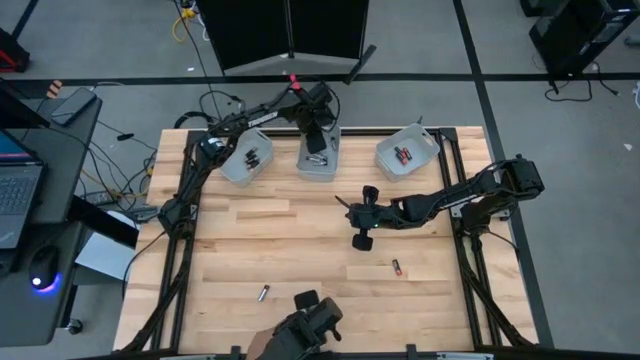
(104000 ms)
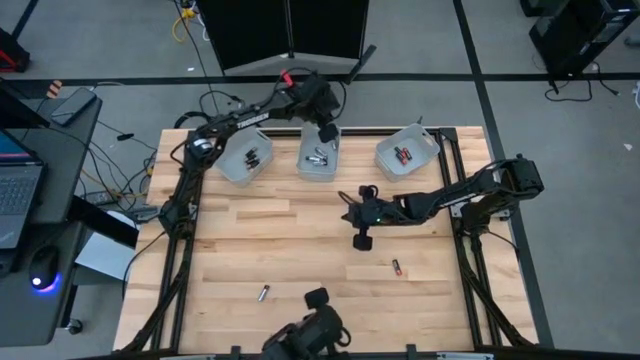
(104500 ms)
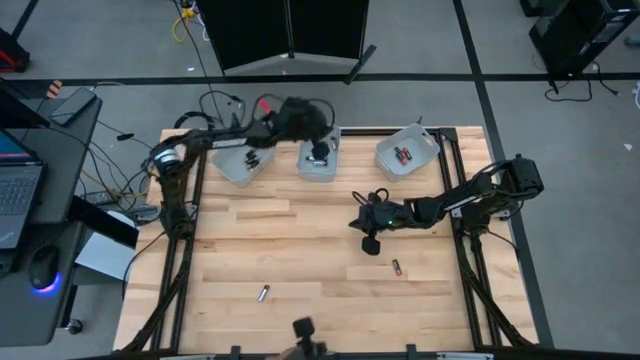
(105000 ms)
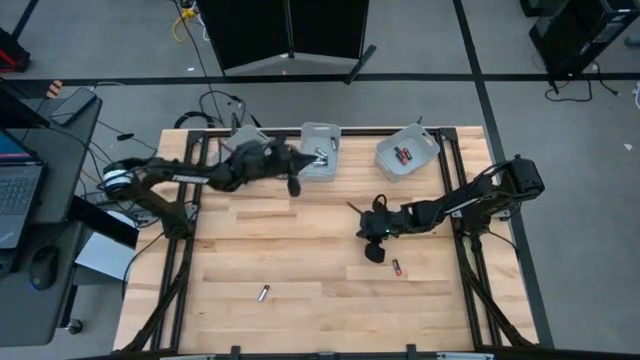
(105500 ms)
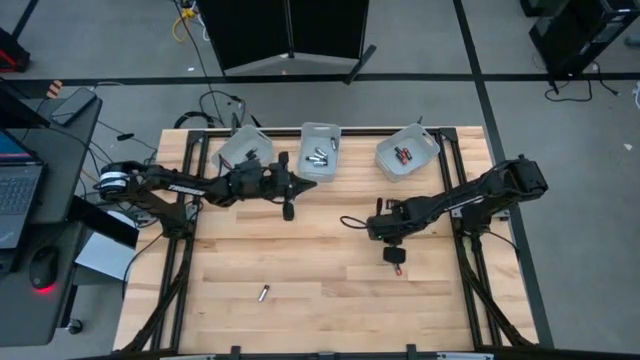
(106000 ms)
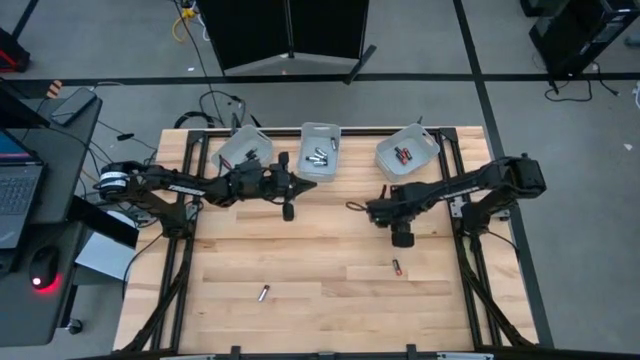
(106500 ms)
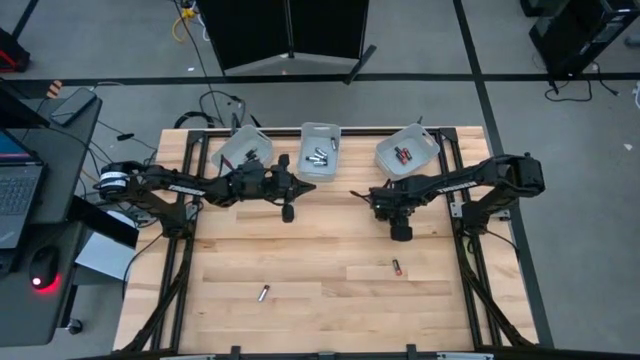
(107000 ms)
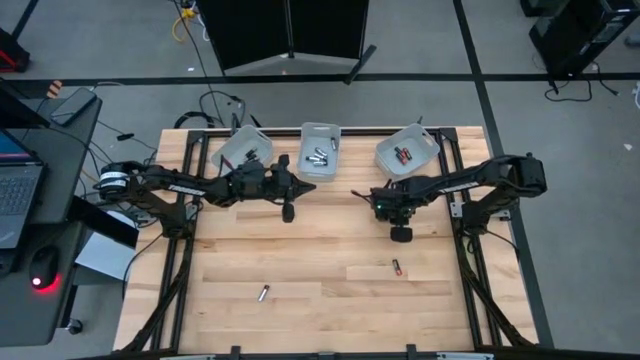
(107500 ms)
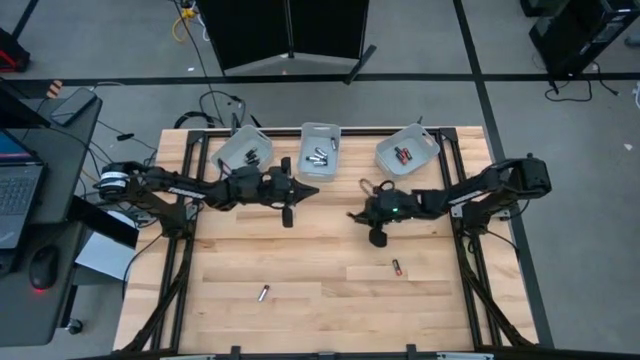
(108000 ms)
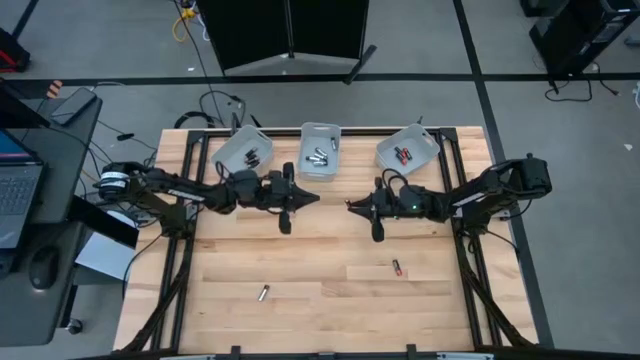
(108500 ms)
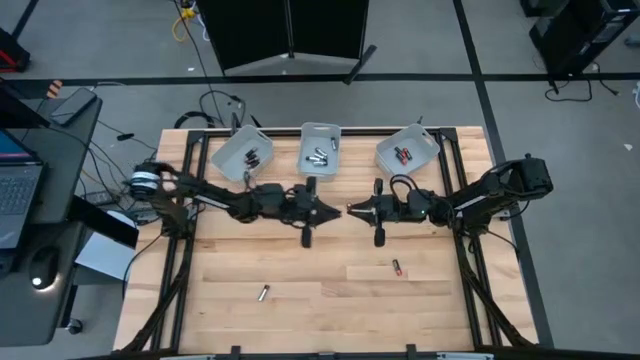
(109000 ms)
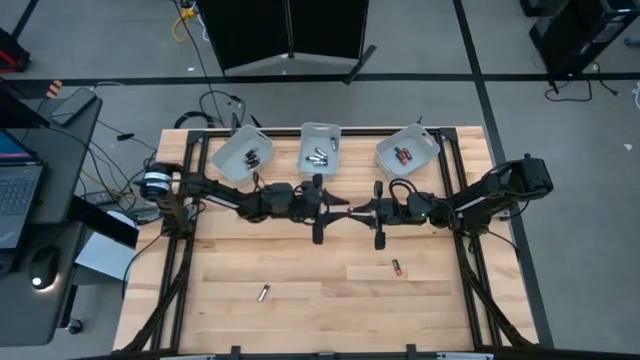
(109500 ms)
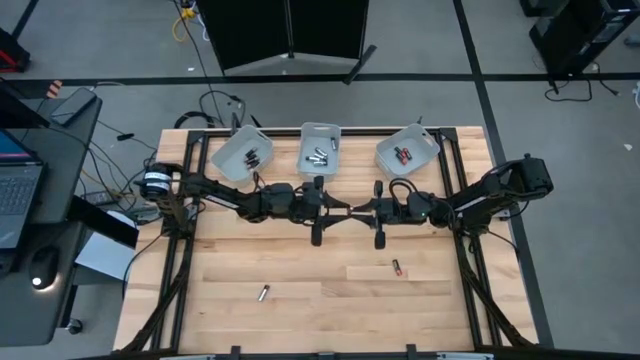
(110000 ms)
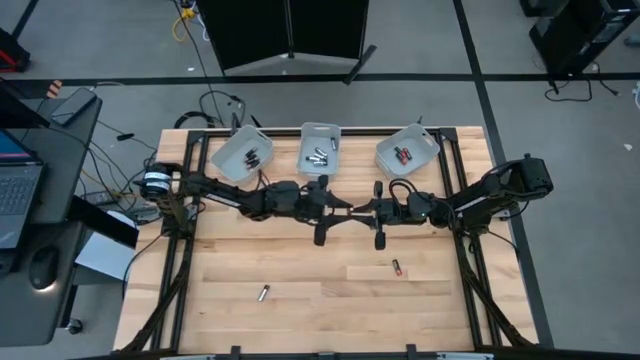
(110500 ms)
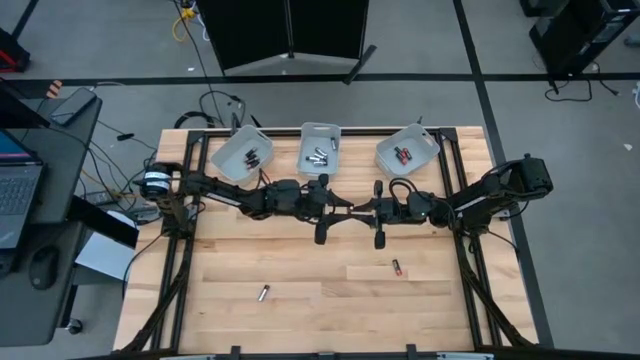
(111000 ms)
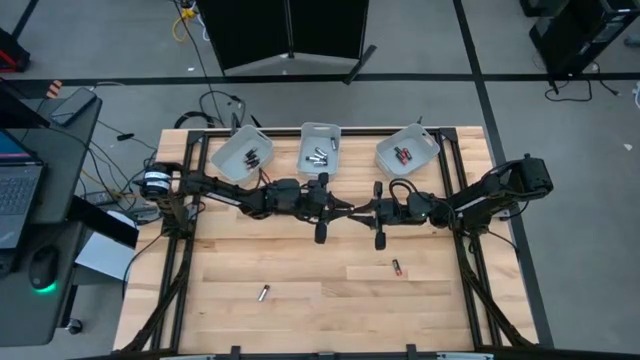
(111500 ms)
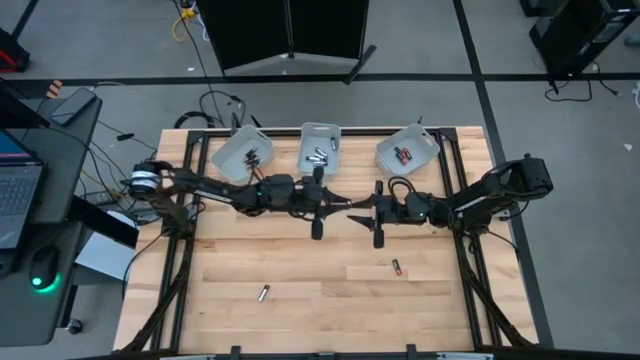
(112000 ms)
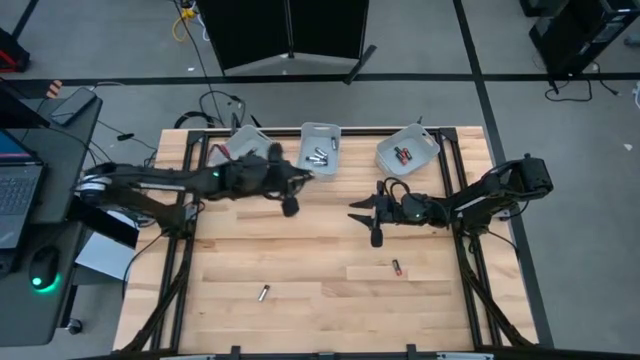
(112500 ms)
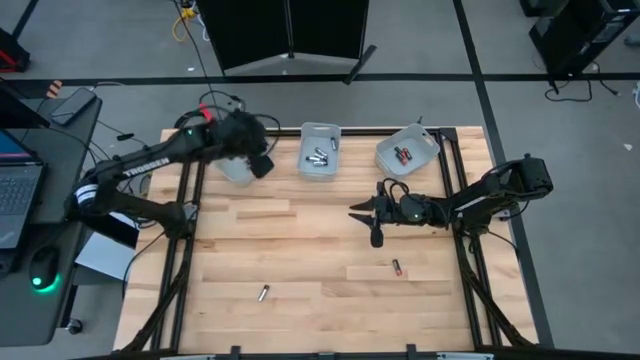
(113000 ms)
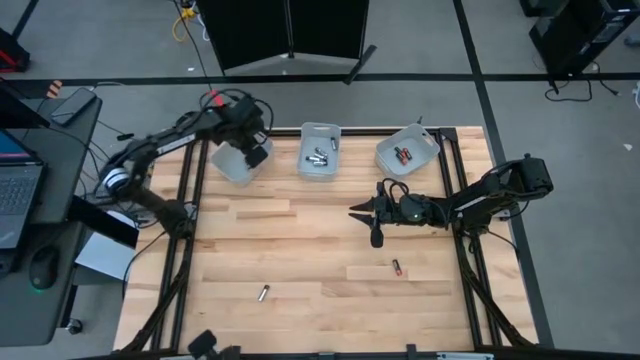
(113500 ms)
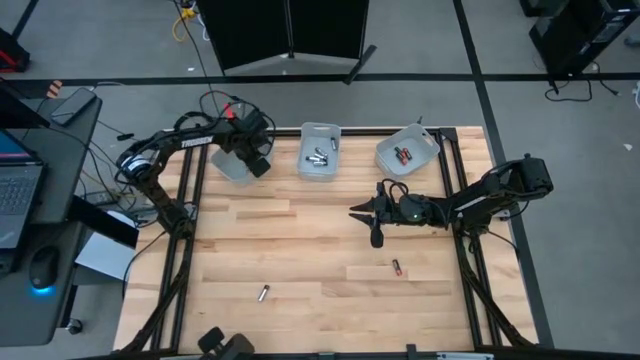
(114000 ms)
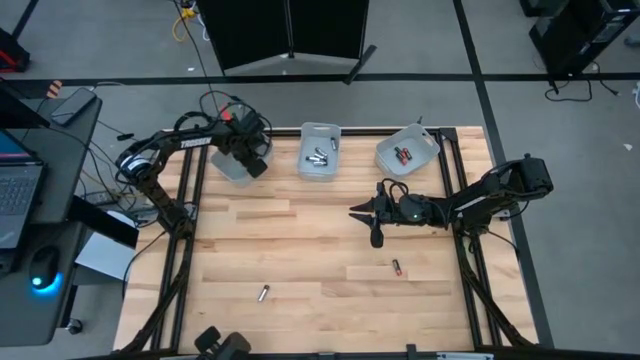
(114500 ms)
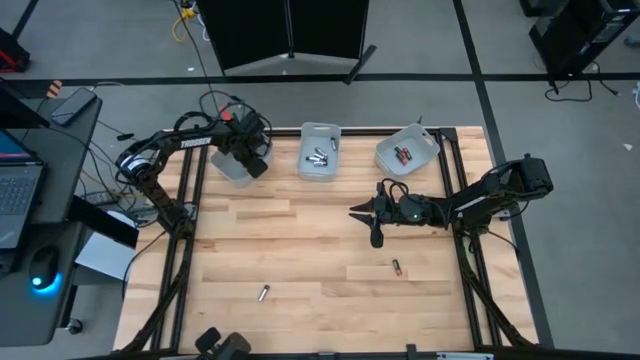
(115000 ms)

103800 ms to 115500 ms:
Task: Sort batteries
Put the gold battery into the left gray bin

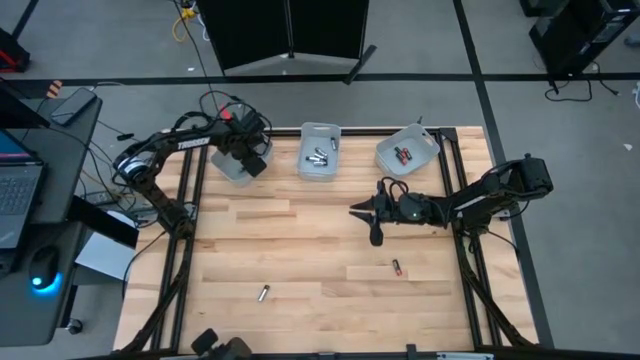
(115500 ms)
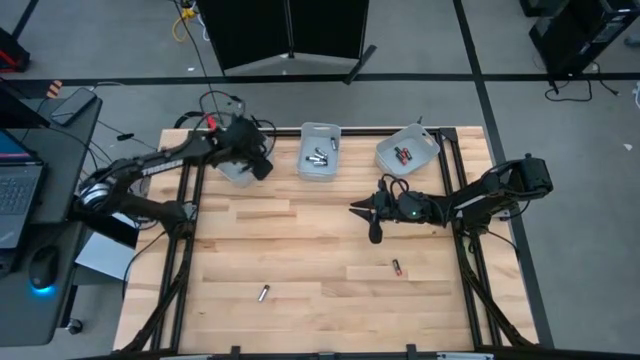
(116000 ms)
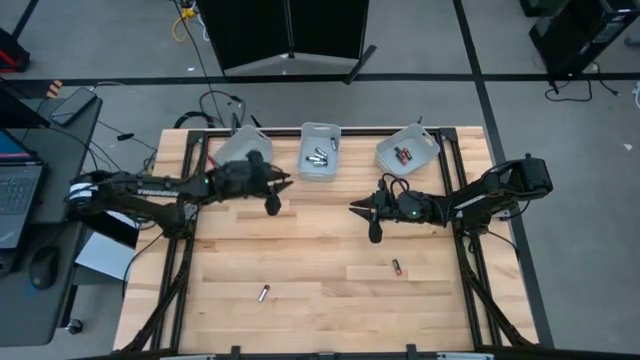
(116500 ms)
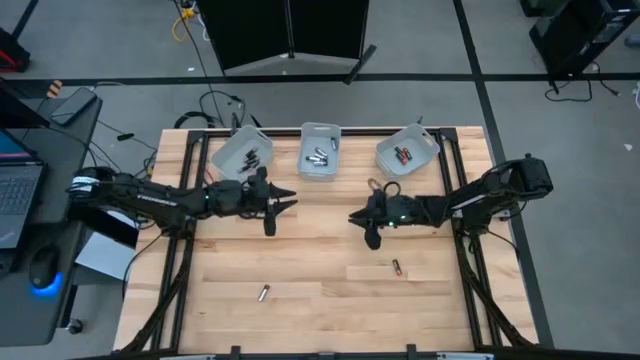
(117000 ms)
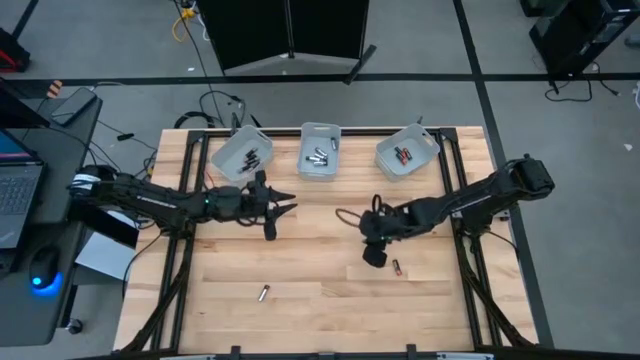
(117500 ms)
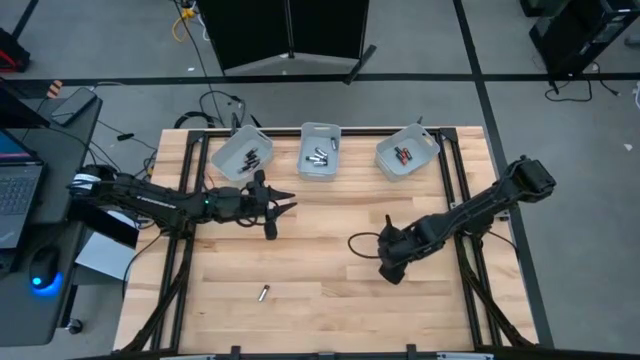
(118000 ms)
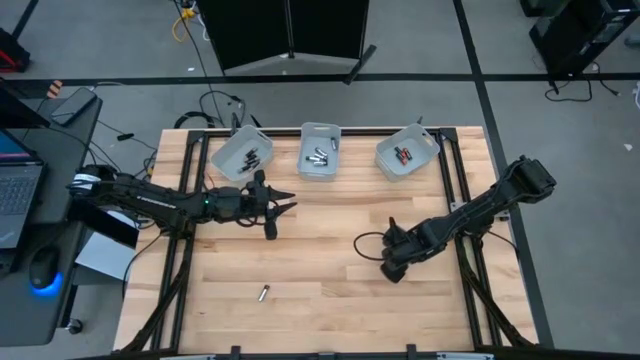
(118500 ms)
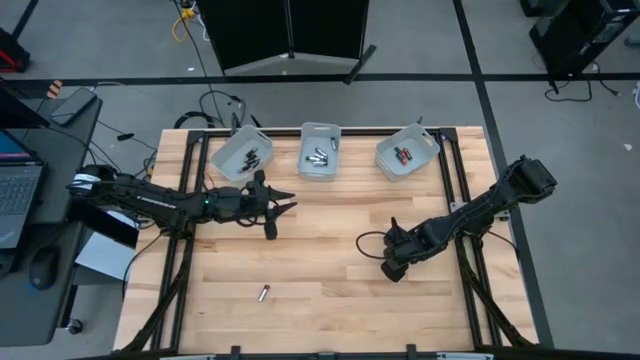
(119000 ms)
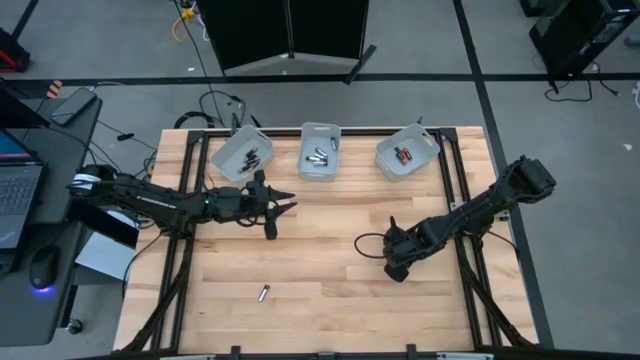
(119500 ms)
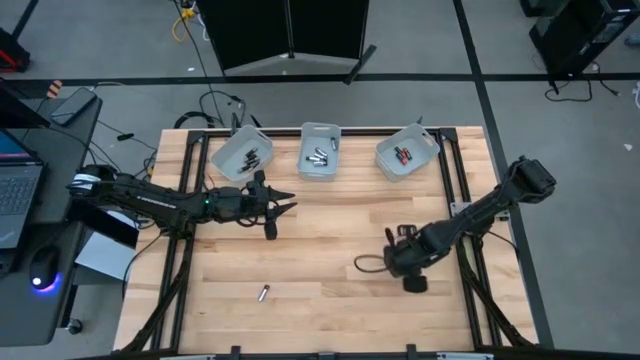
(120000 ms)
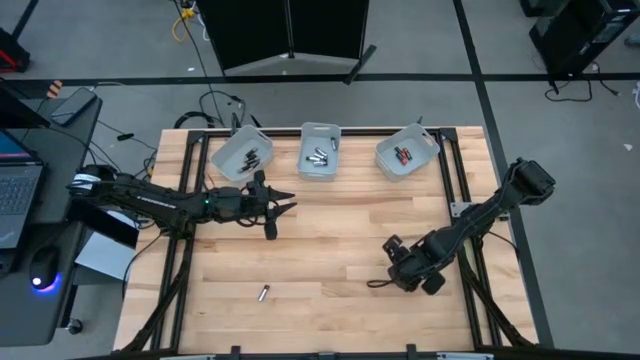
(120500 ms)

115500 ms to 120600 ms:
Put the red battery into the right gray bin

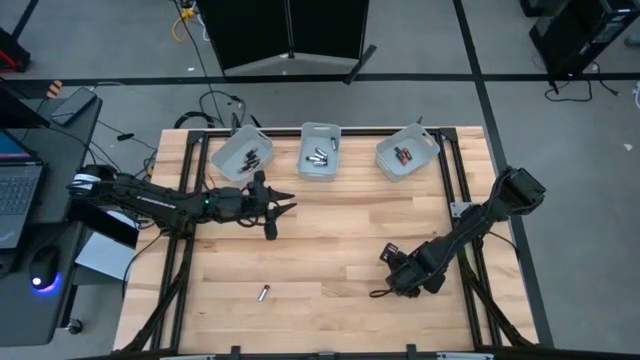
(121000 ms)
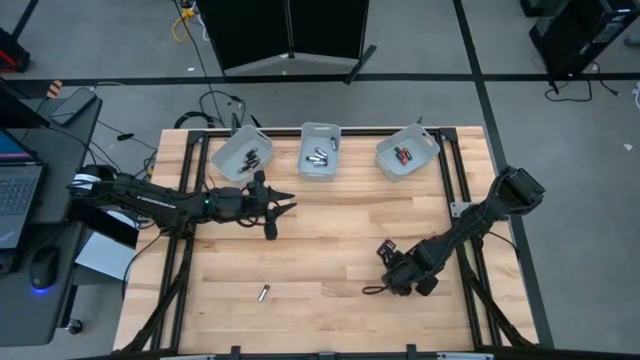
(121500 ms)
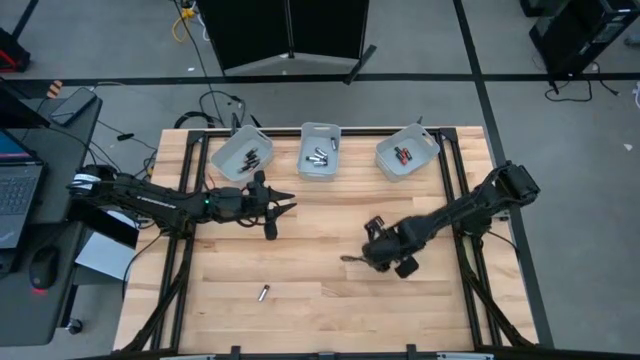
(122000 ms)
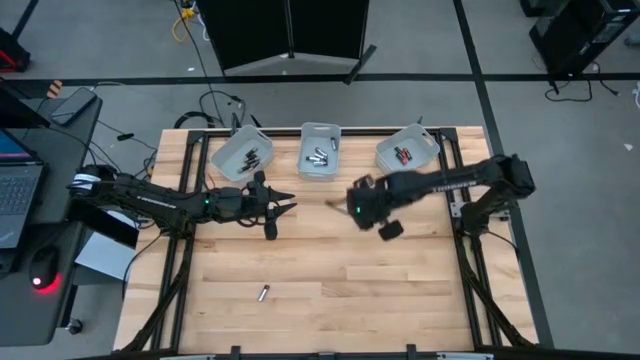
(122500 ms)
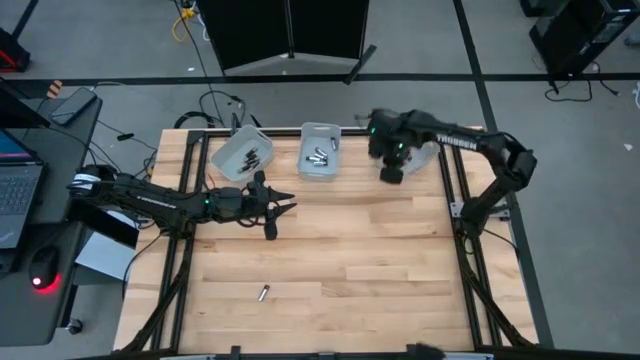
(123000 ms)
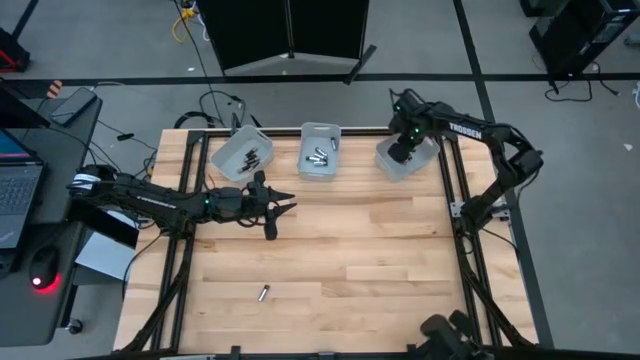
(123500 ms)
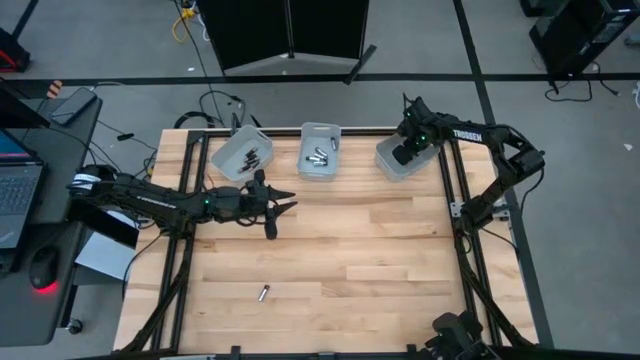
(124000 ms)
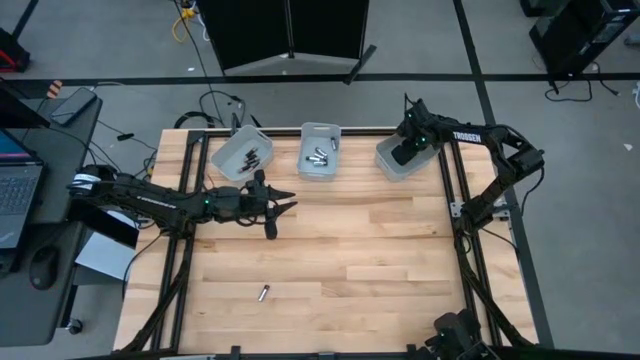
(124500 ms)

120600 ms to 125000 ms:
Put the red battery into the right gray bin
